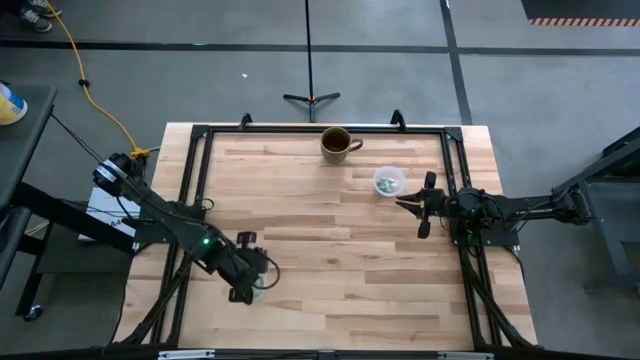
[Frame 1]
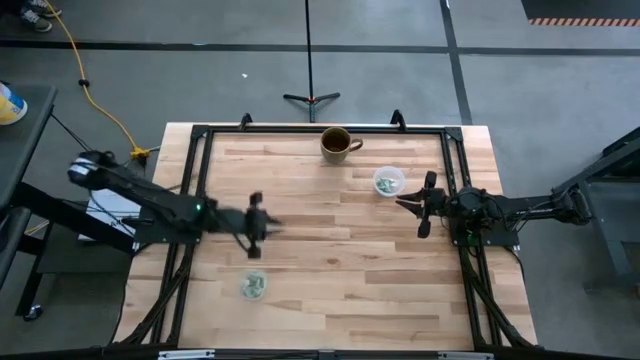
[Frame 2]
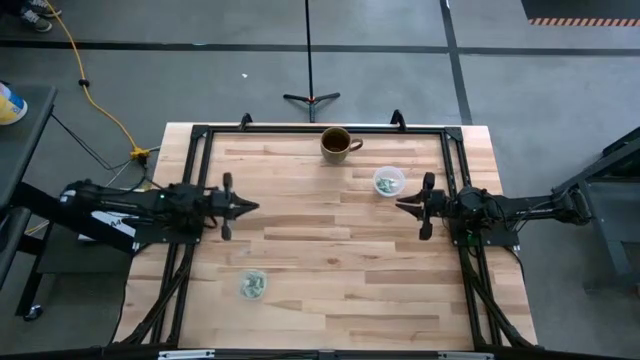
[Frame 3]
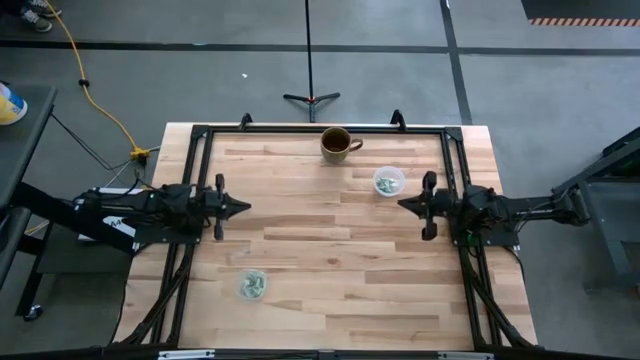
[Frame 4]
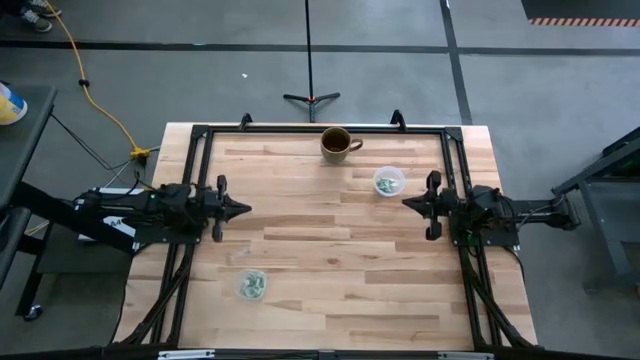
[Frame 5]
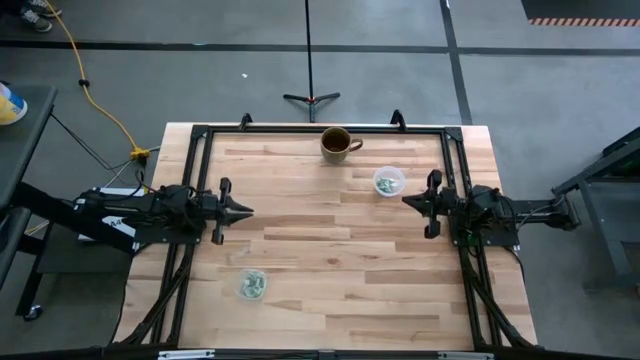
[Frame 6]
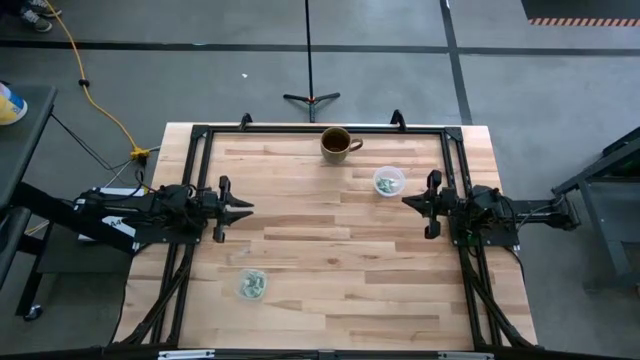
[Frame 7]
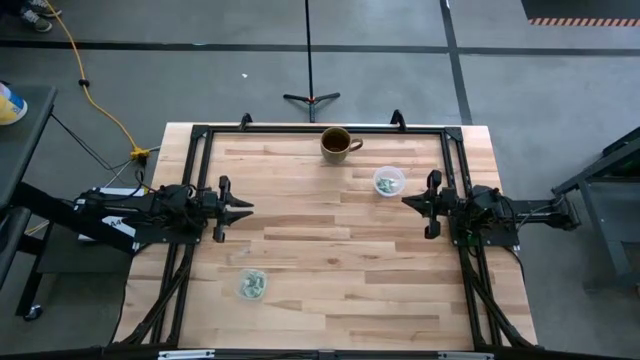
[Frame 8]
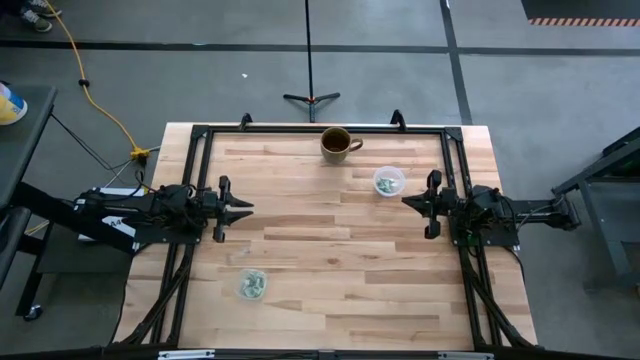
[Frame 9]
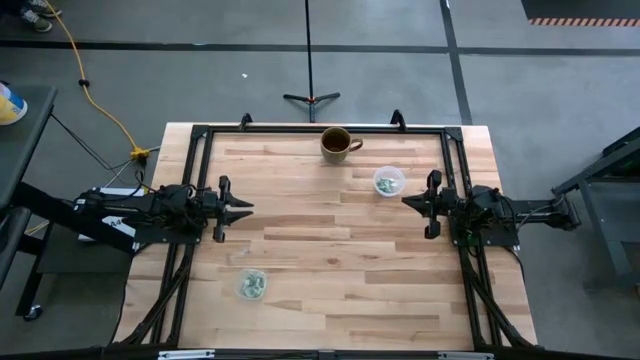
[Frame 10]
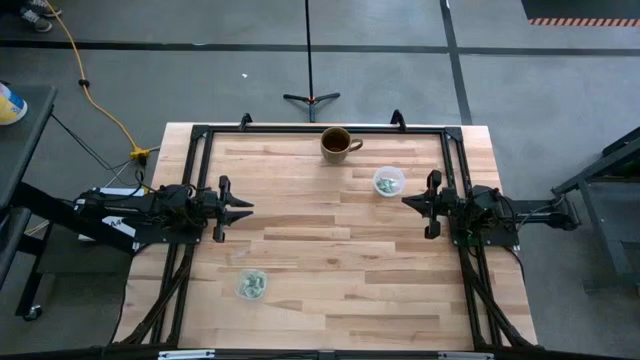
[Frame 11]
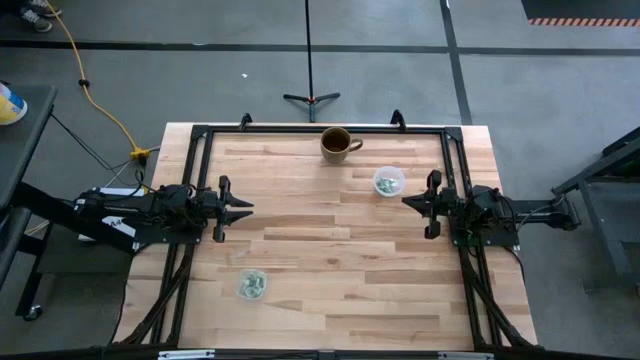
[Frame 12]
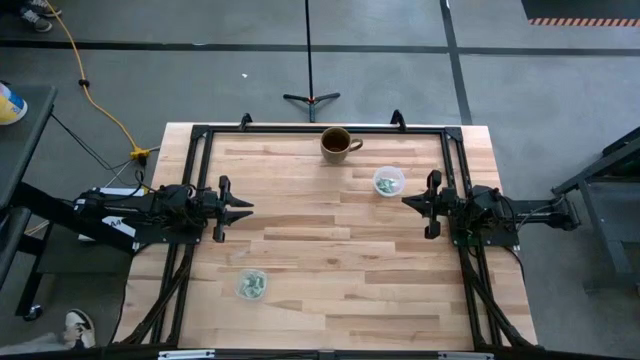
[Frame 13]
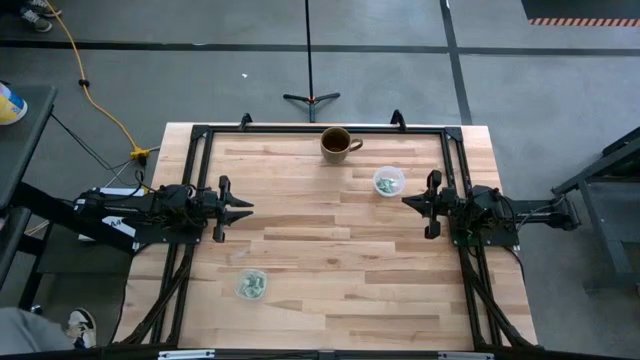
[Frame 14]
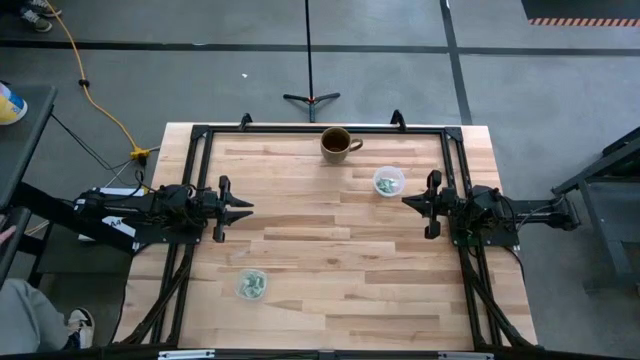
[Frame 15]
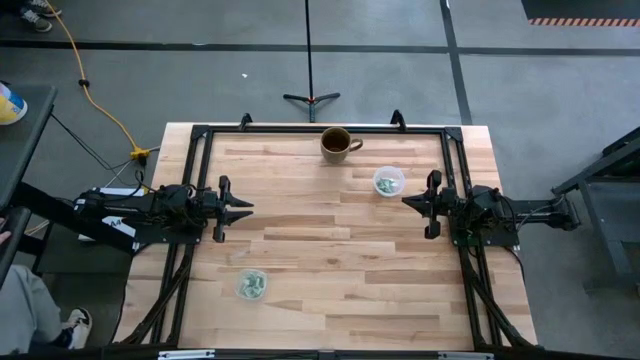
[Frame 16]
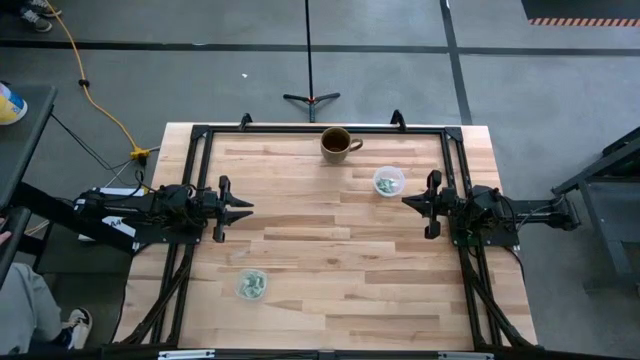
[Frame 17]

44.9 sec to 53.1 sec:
Task: Pick and place Stevia / Truvia into bins
Return to Home Position

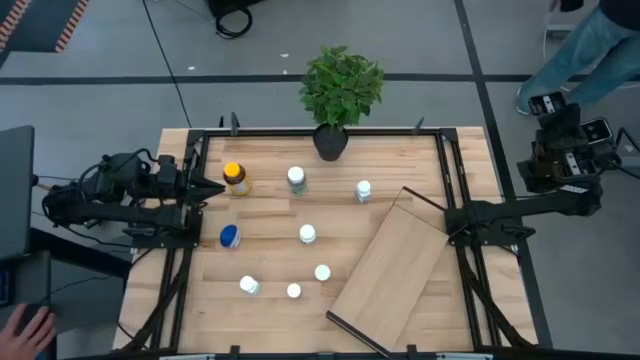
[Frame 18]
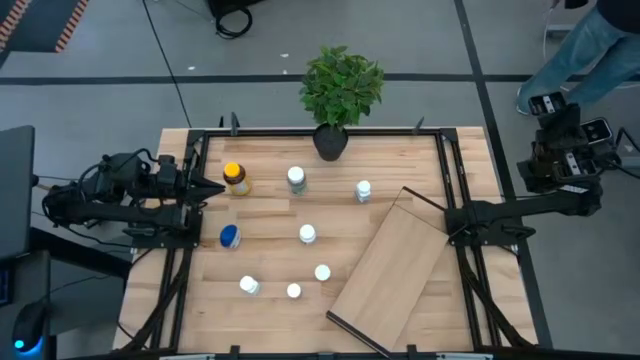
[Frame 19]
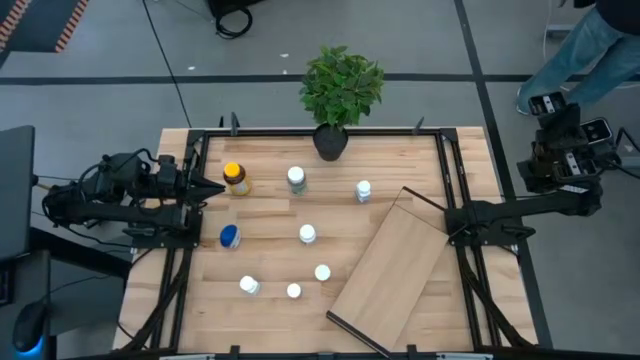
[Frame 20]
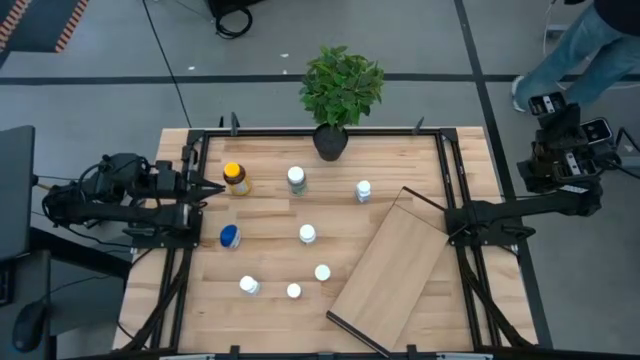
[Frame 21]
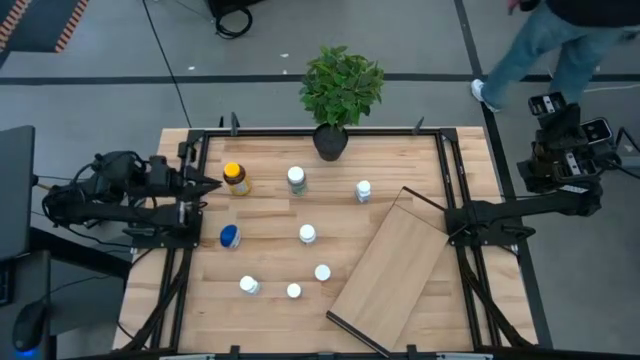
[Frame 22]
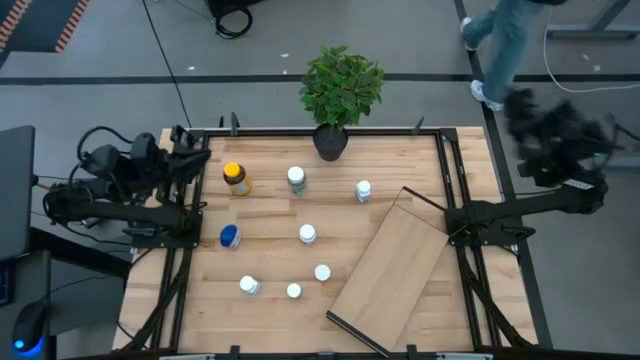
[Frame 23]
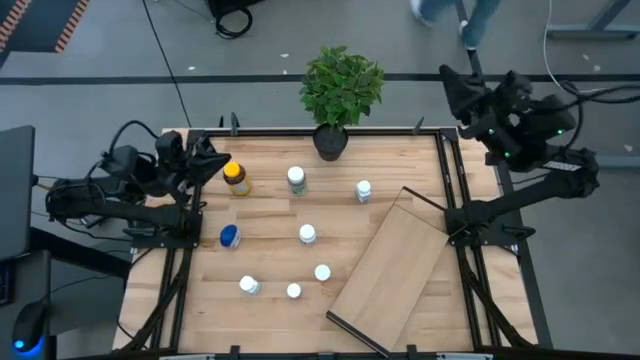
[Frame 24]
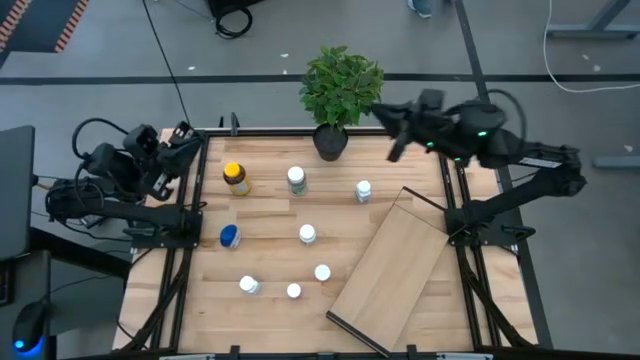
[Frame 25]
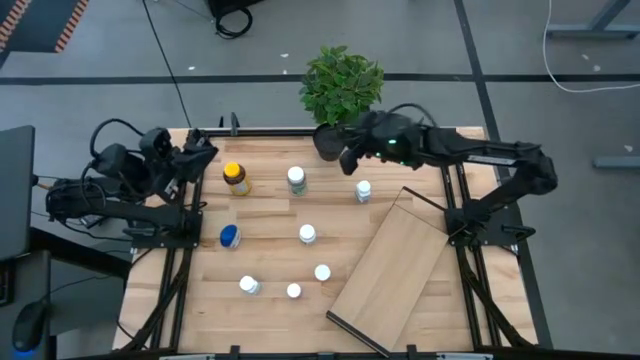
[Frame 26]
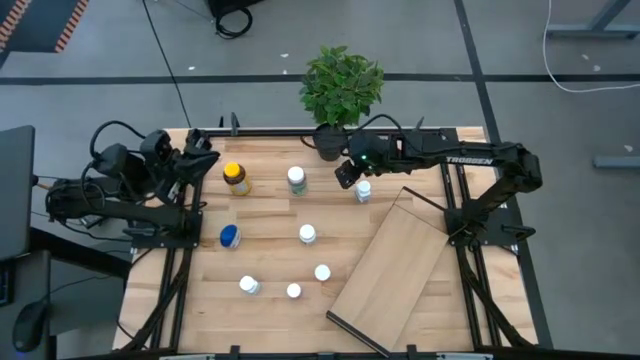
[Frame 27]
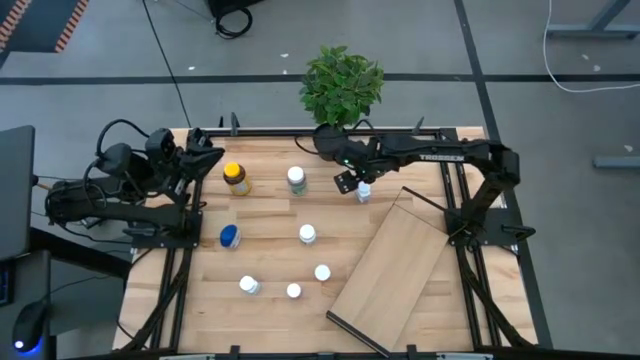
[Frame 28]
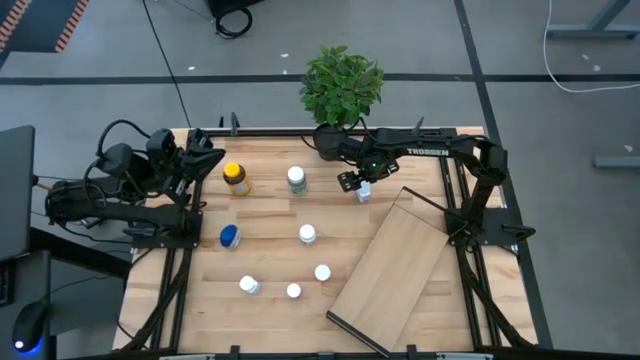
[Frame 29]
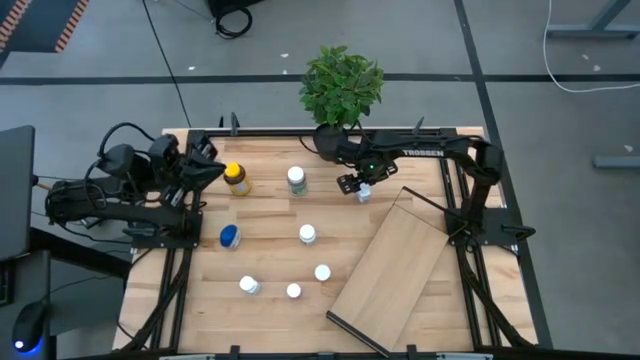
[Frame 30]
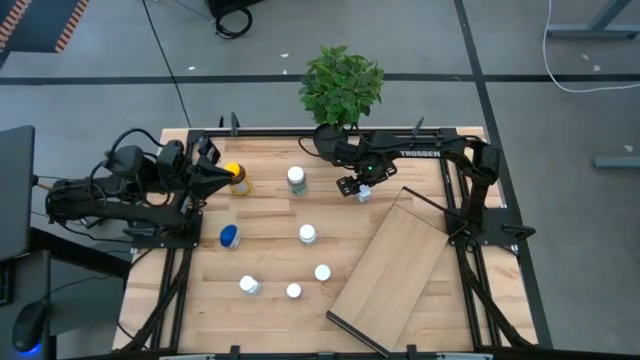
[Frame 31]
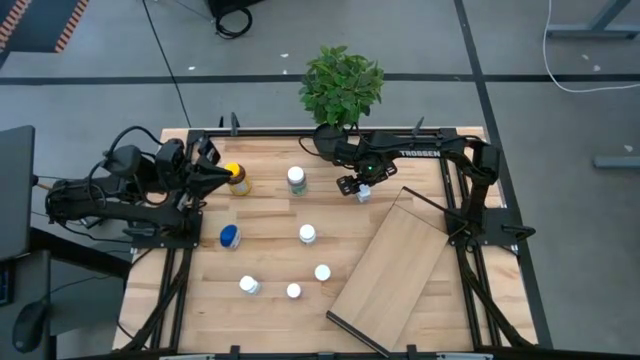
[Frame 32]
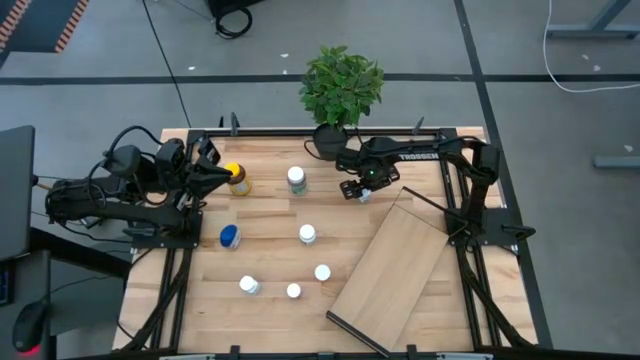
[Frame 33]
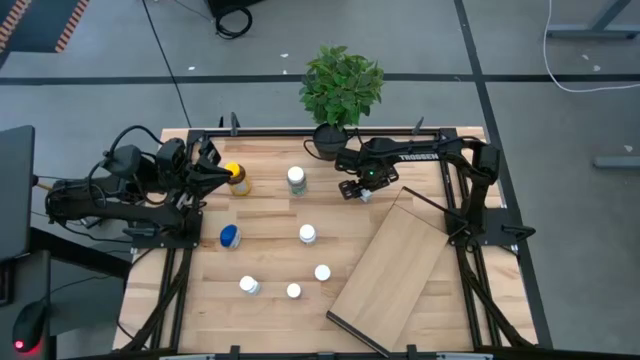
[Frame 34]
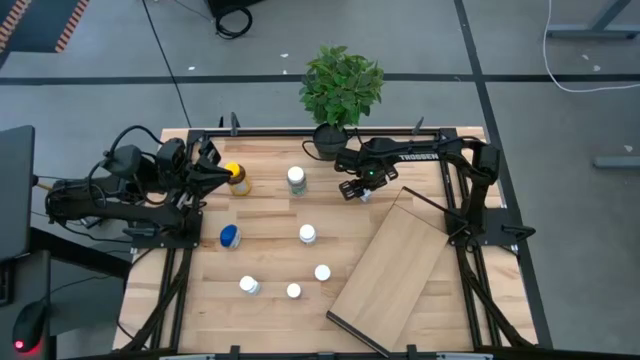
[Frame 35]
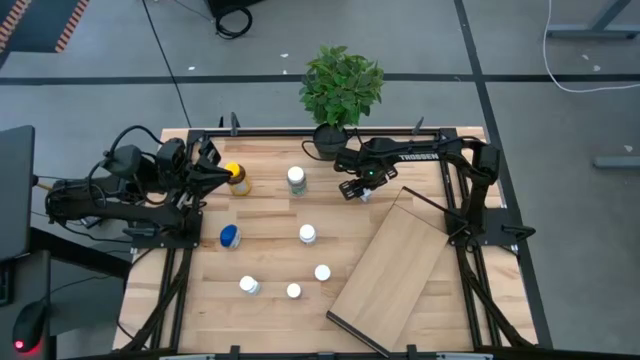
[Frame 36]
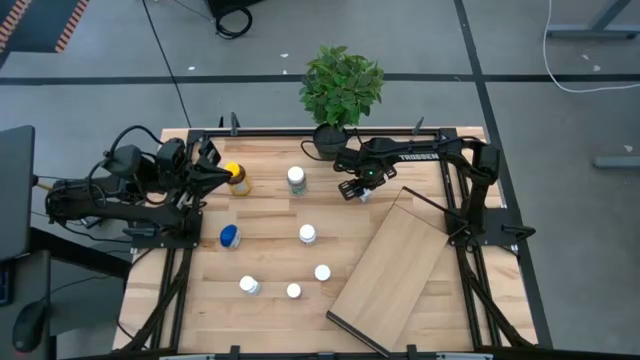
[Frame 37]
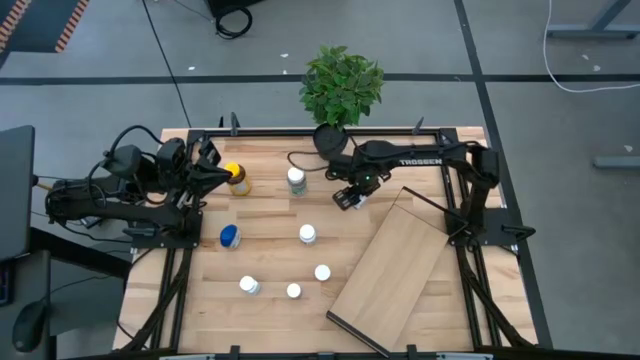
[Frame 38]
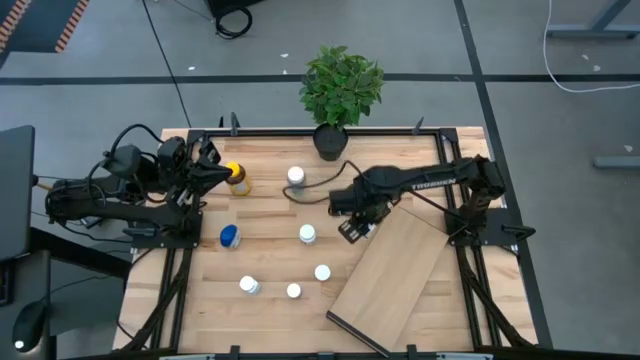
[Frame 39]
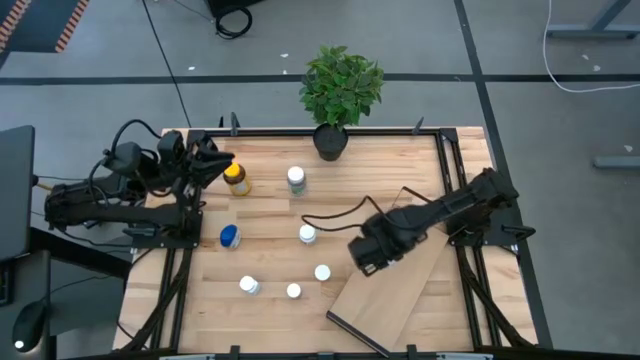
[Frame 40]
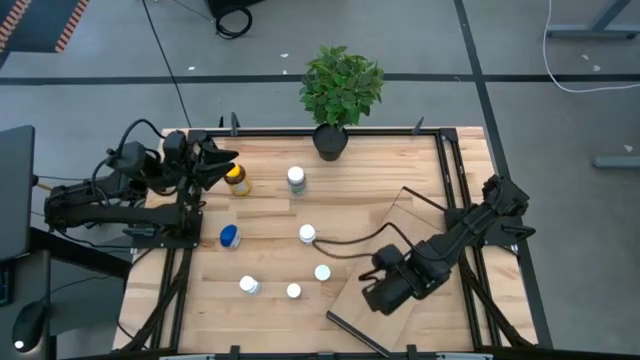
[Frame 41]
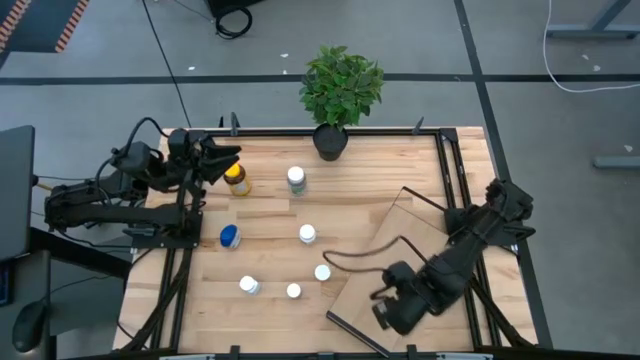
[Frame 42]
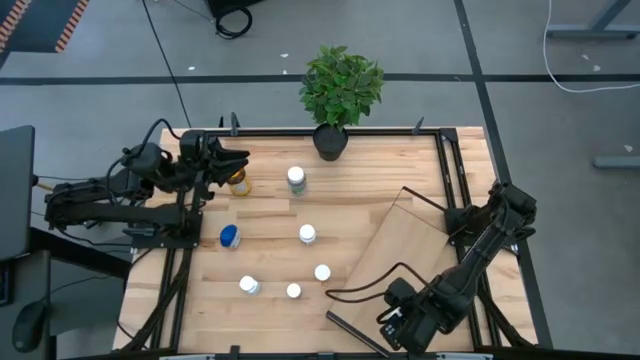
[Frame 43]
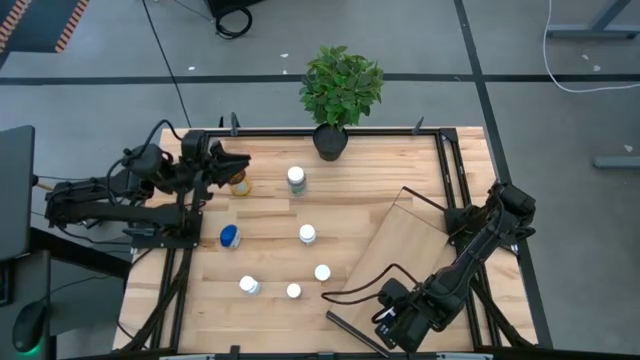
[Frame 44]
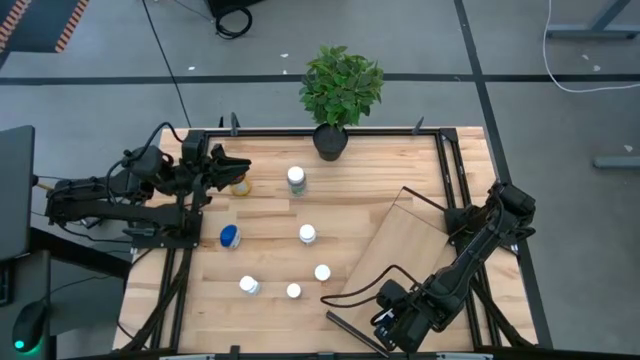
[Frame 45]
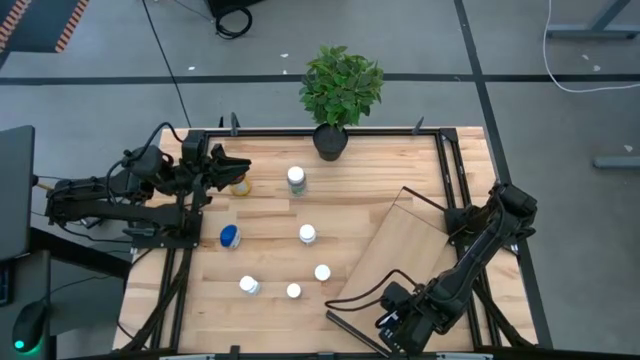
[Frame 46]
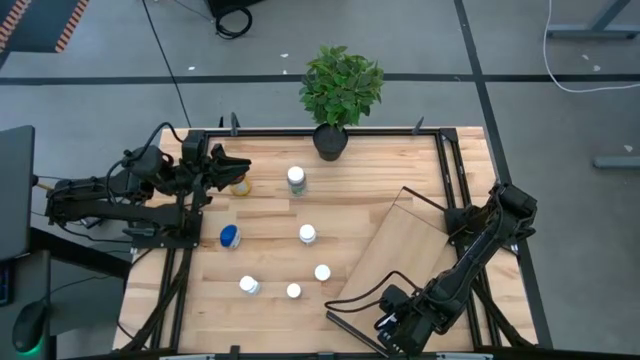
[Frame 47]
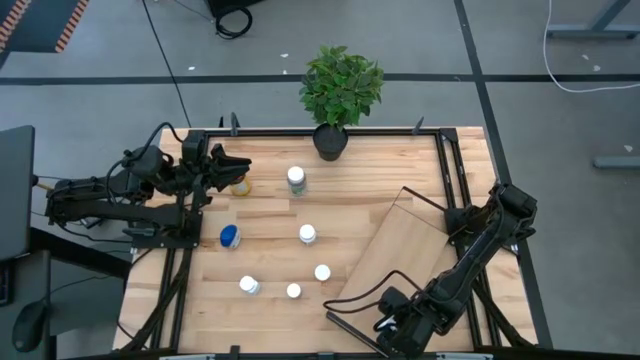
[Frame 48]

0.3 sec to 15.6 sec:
Task: Pick and place medicine bottles onto shelf by color
Put the top right white medicine bottle on the shelf
